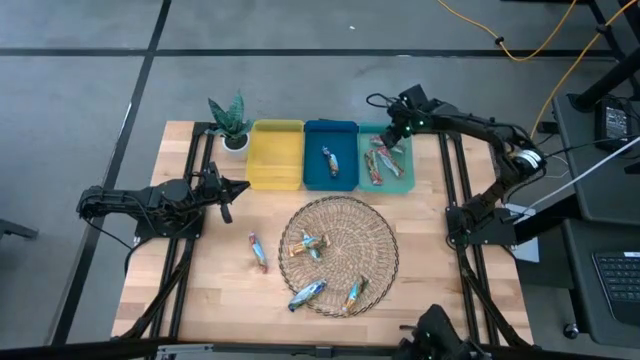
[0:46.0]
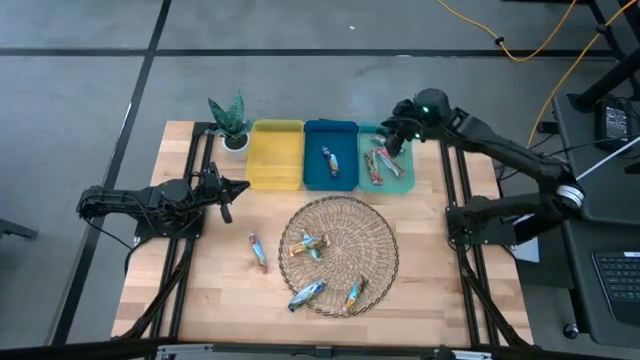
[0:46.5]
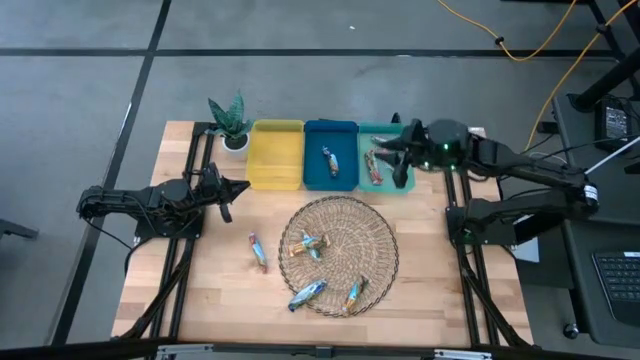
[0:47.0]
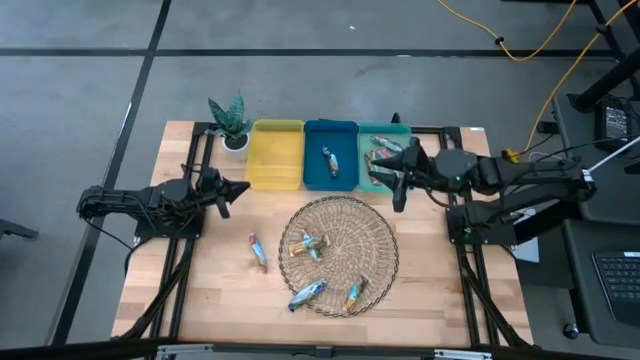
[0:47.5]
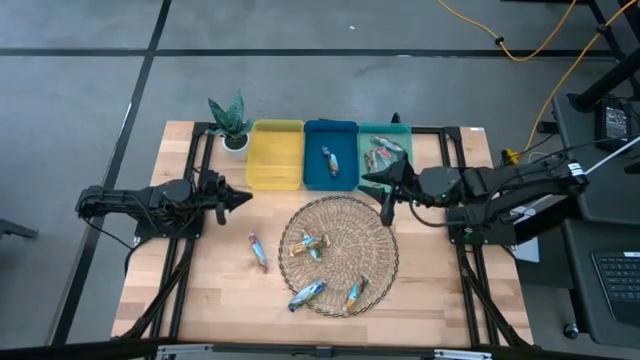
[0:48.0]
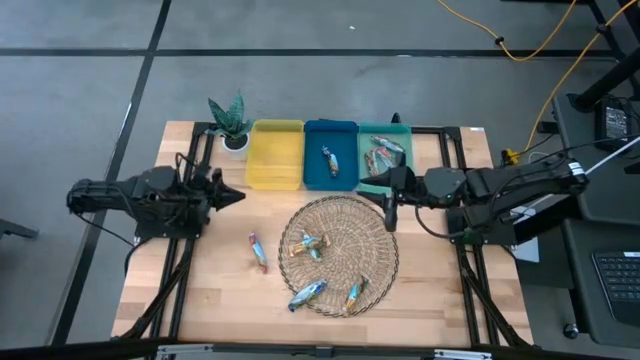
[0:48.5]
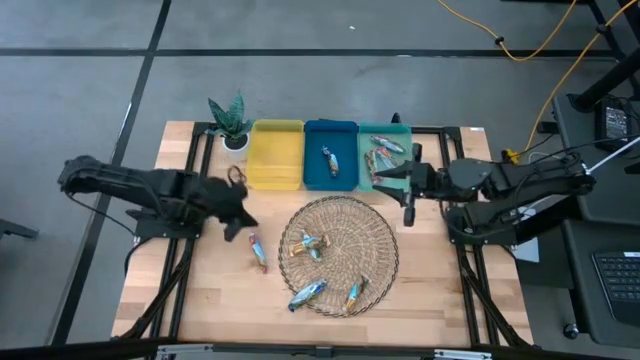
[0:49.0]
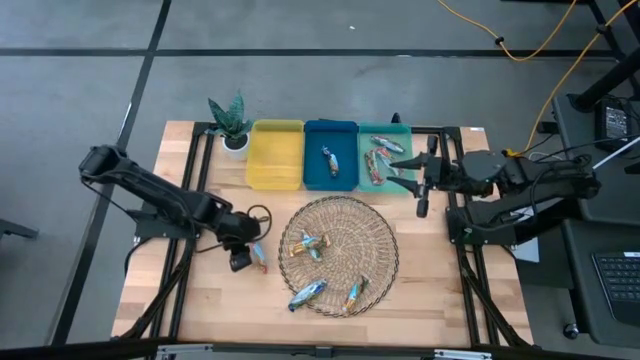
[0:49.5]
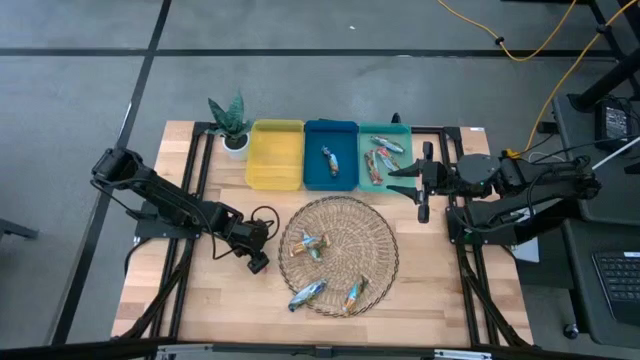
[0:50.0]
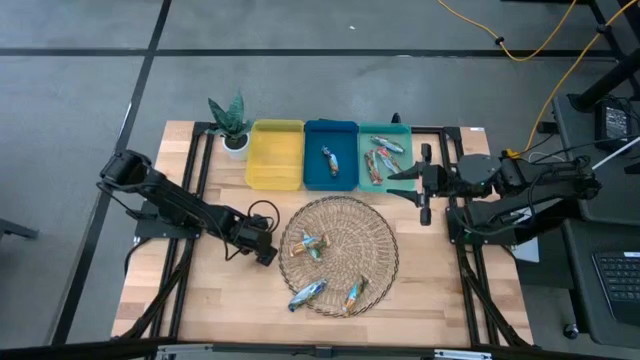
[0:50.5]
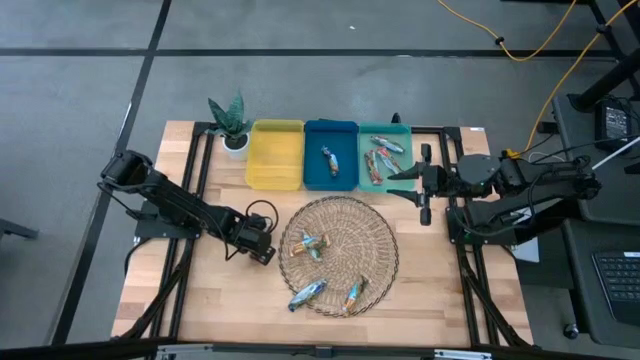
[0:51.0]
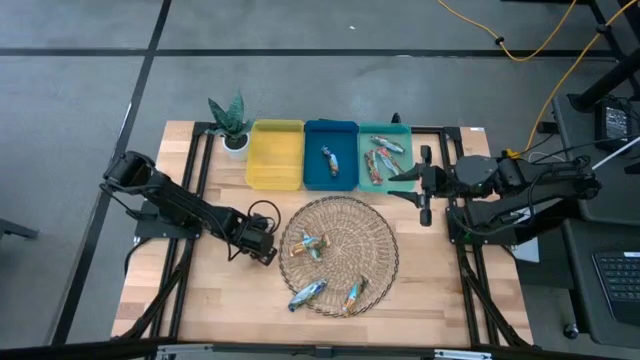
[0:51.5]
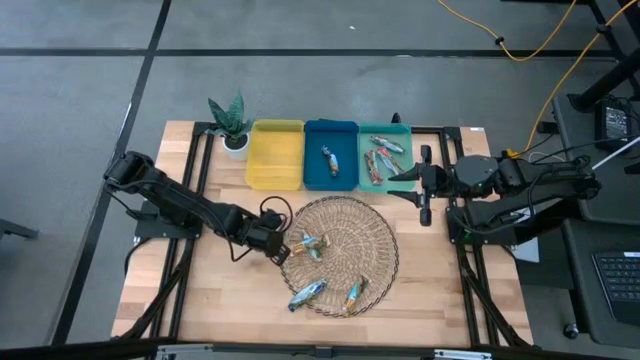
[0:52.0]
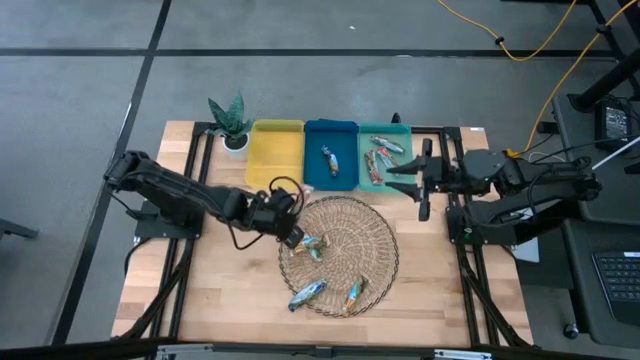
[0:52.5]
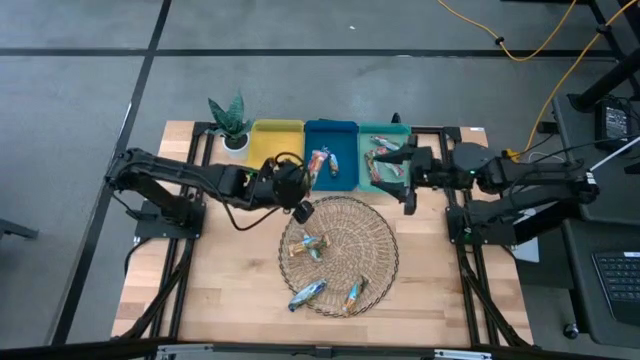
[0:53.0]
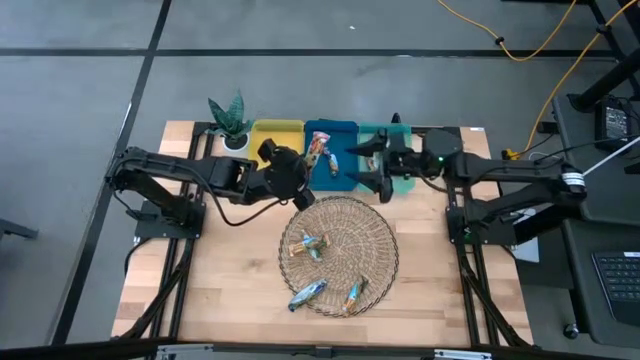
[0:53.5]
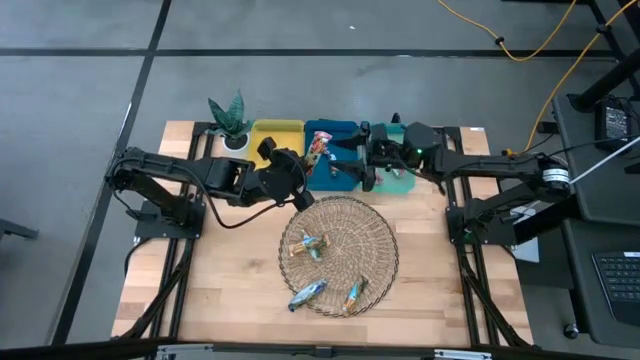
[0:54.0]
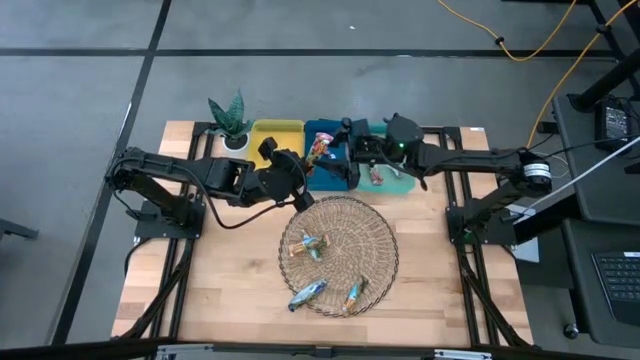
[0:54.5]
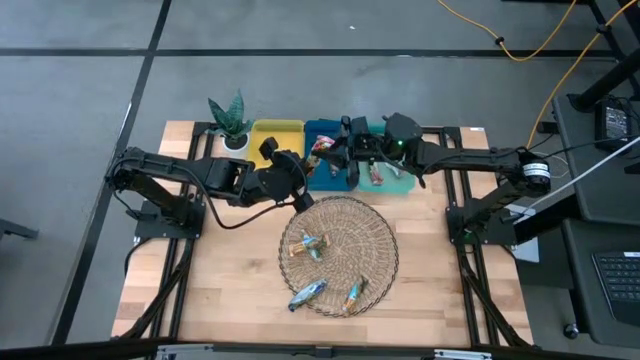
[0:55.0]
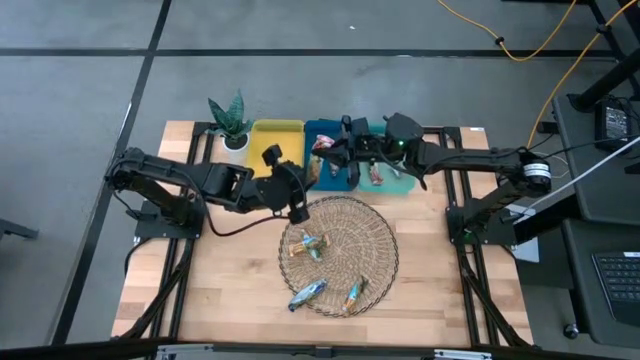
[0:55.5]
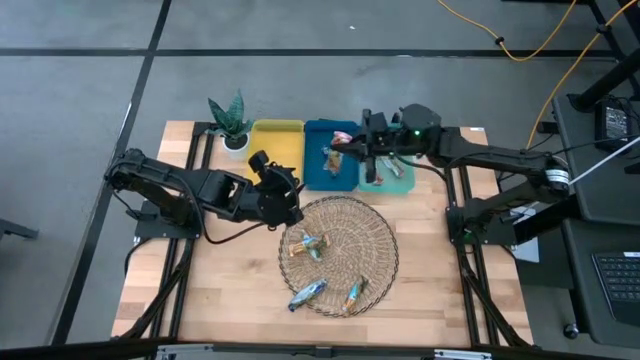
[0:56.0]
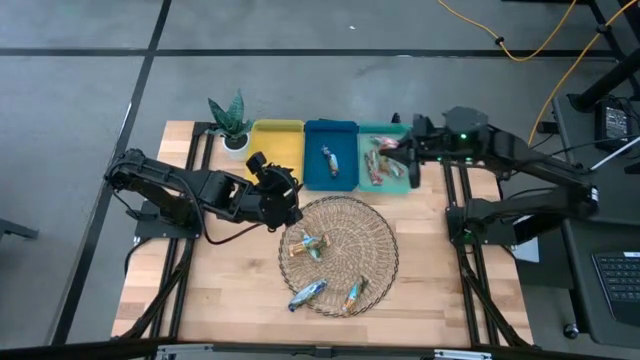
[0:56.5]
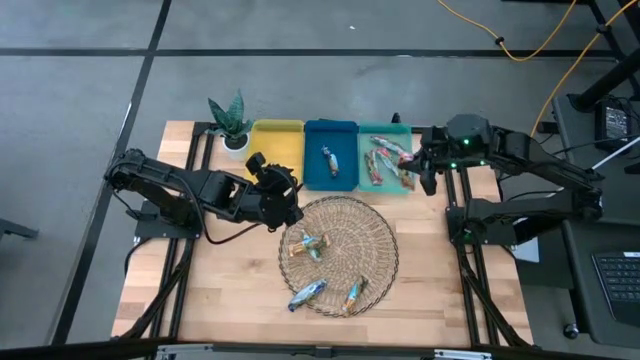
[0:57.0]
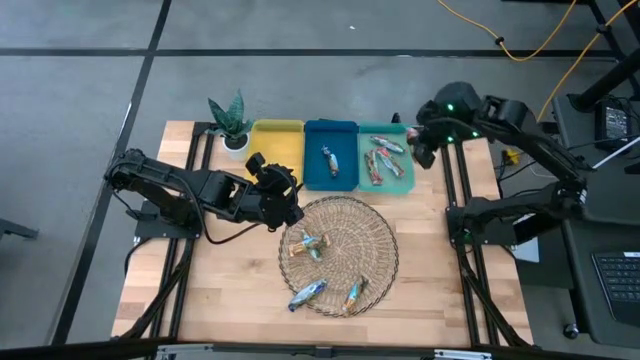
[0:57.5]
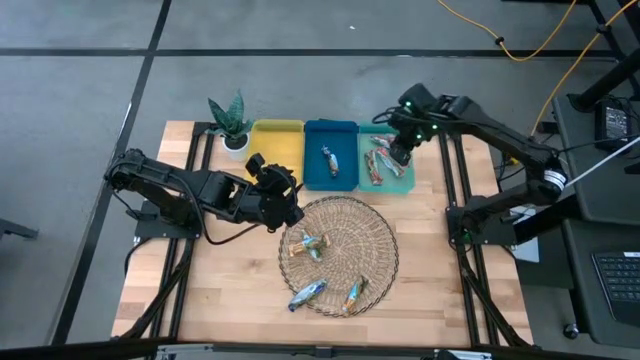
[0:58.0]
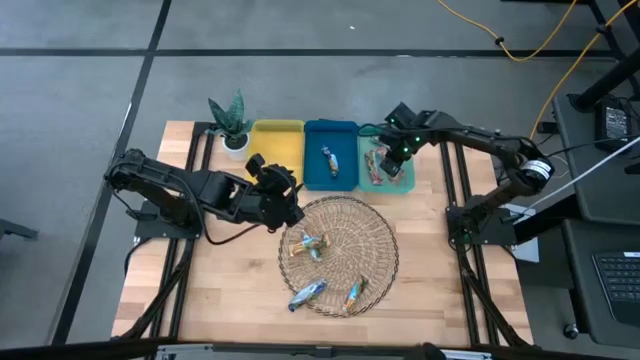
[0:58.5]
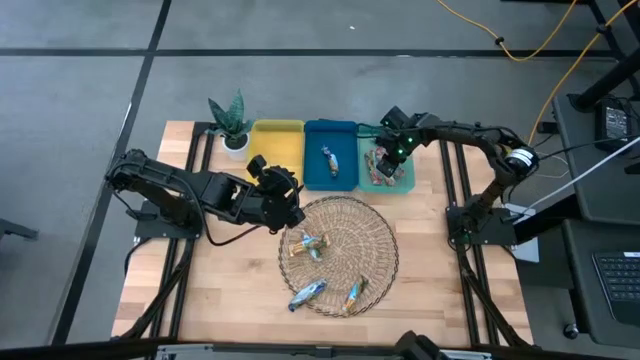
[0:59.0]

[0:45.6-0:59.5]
Task: Pick and place Granola Bars by type
Put the red granola bar into the green bin

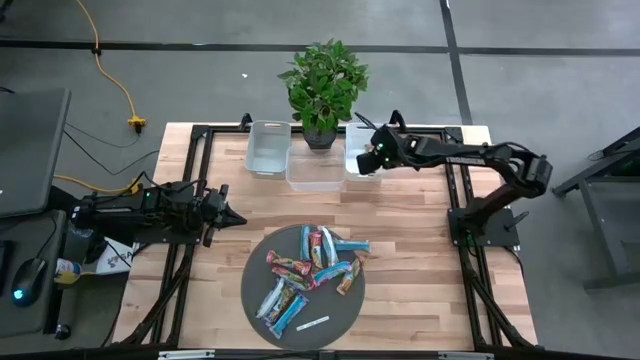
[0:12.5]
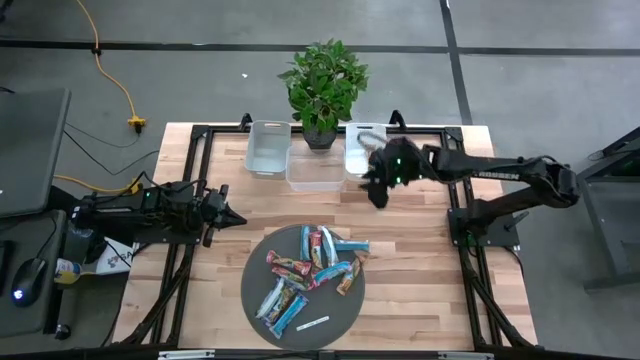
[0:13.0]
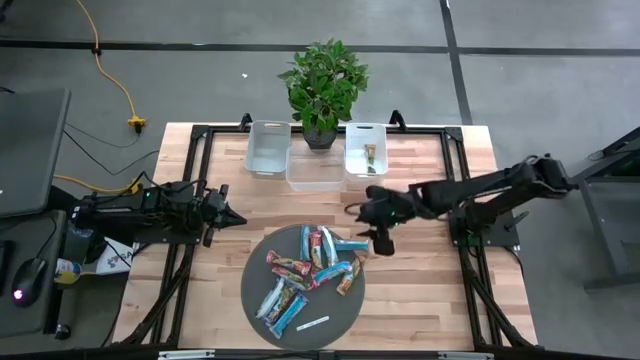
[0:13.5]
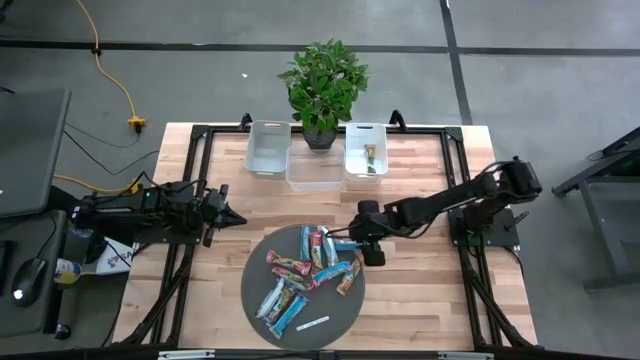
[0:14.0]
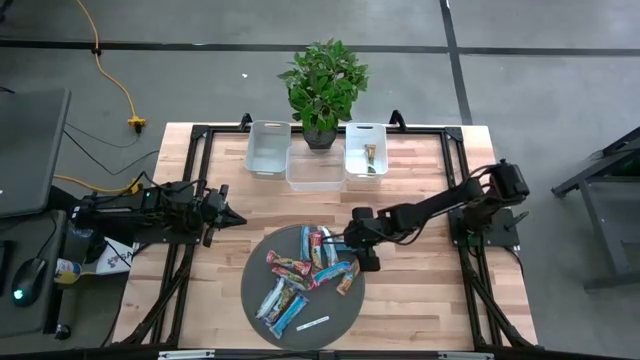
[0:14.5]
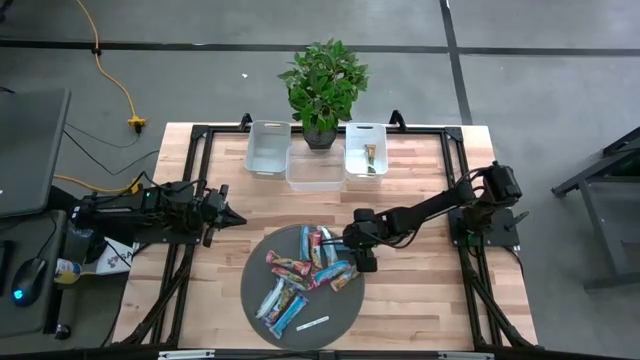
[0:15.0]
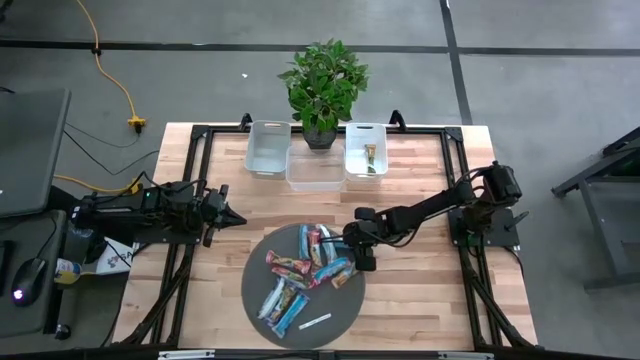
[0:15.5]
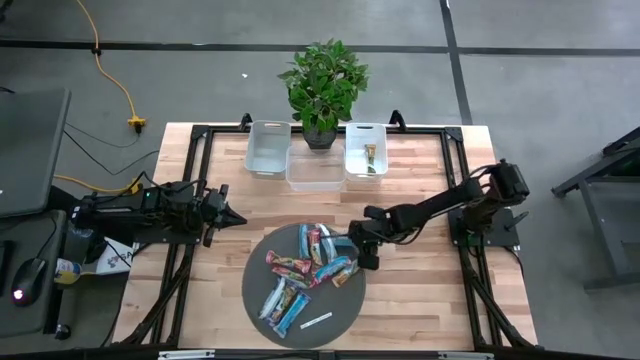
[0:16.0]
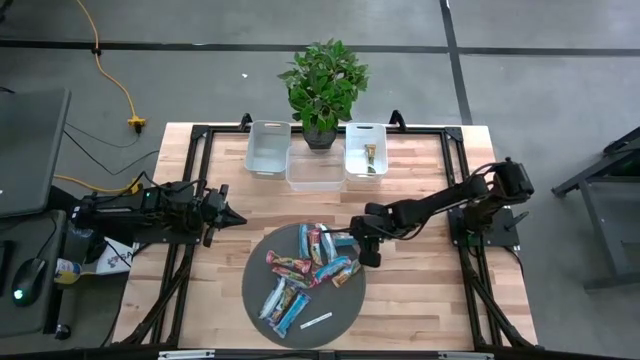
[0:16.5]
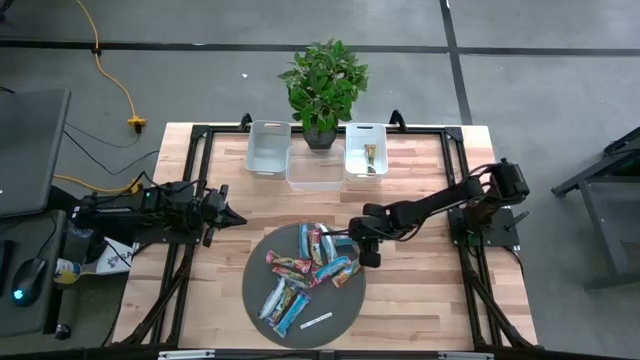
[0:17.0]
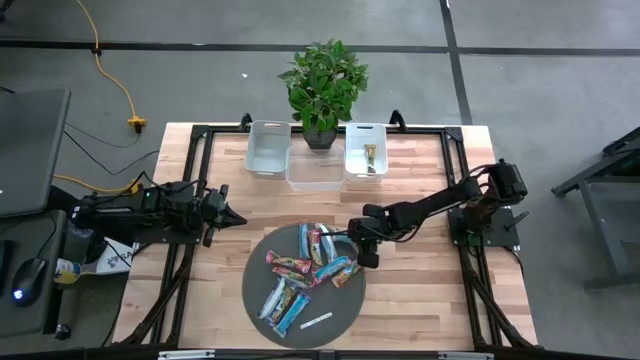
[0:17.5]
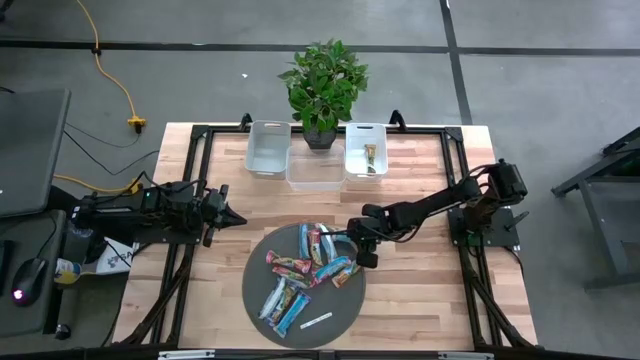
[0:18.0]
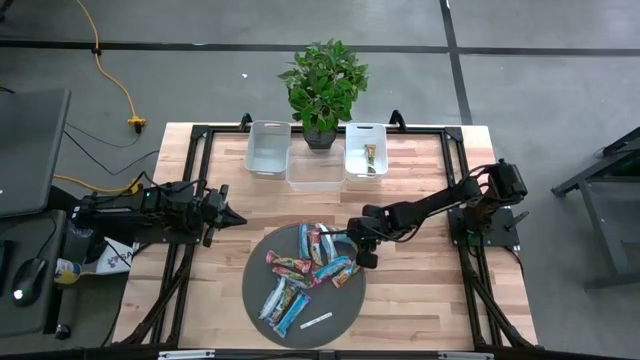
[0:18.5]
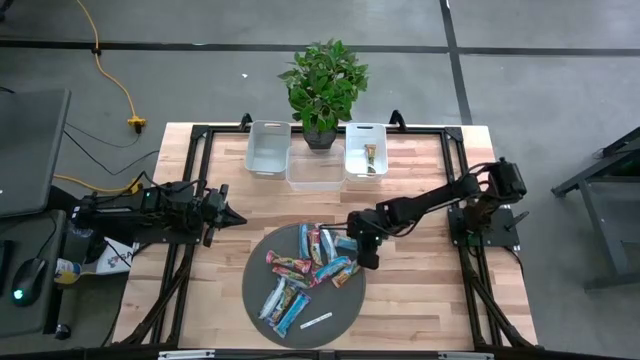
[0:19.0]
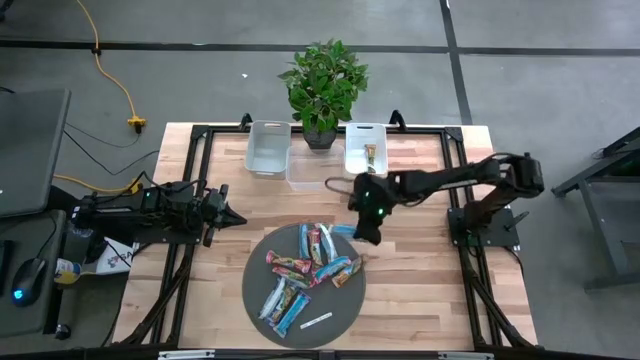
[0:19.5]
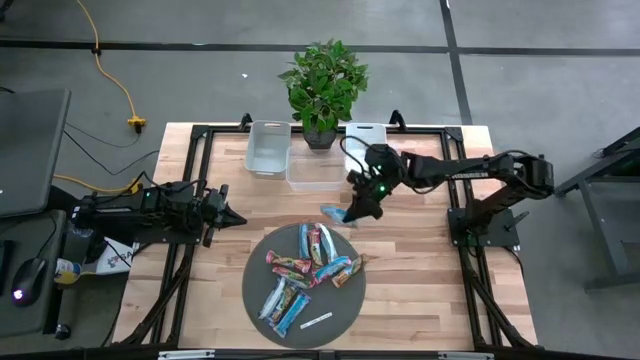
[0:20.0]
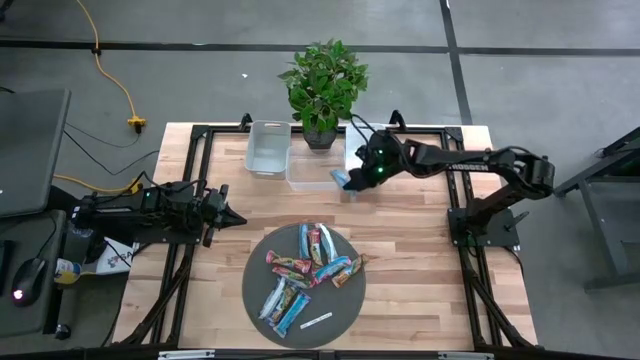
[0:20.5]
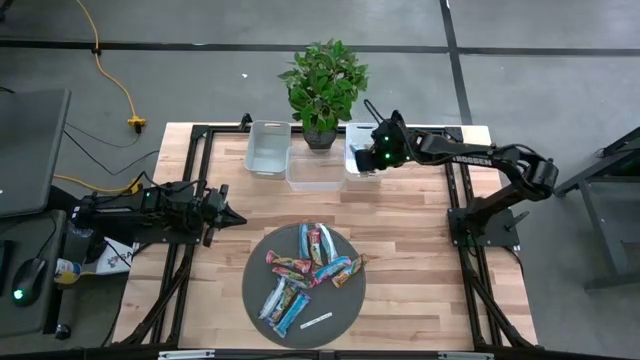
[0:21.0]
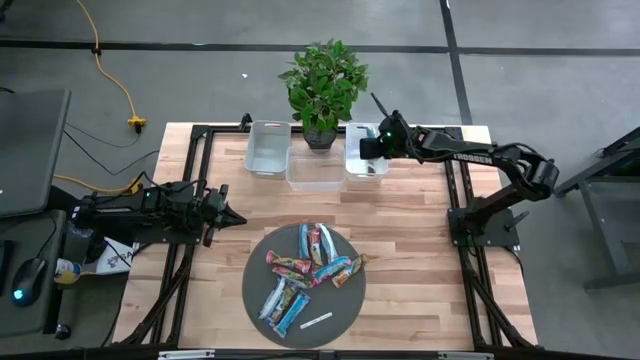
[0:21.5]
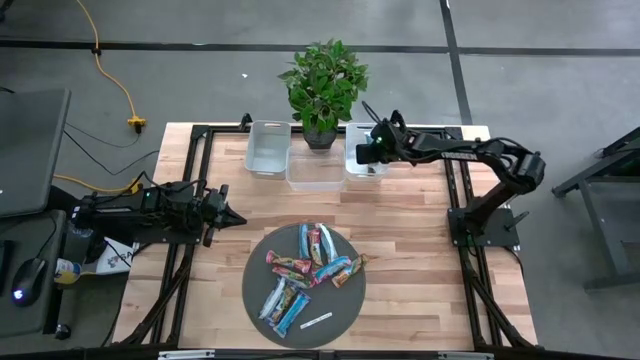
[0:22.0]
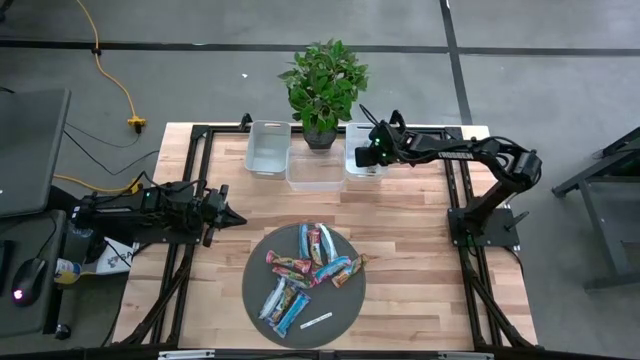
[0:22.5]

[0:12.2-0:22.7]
Task: Pick and place Granola Bars by type
Put the yellow granola bar into the white bin
